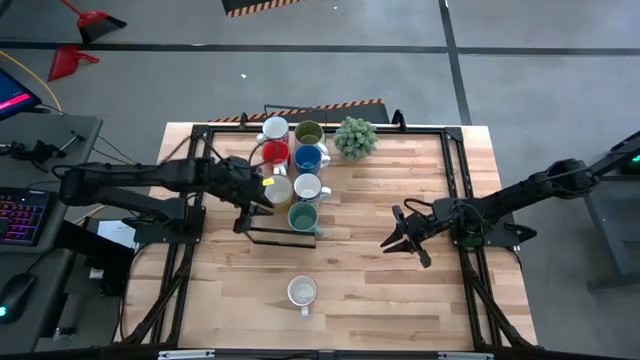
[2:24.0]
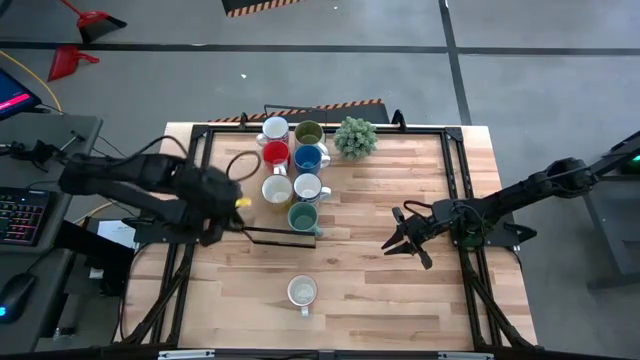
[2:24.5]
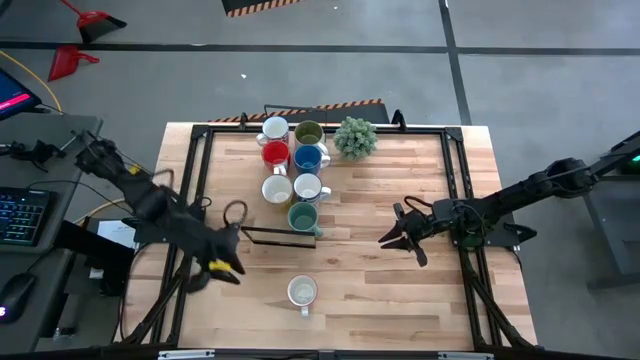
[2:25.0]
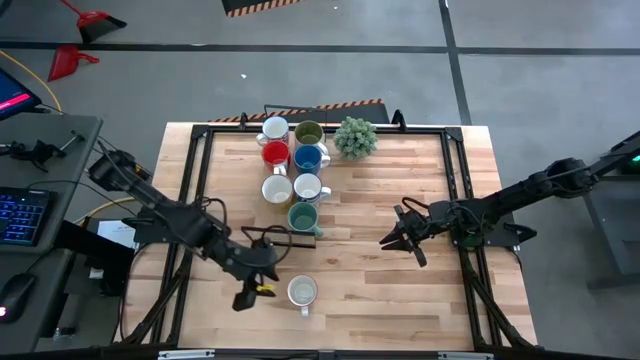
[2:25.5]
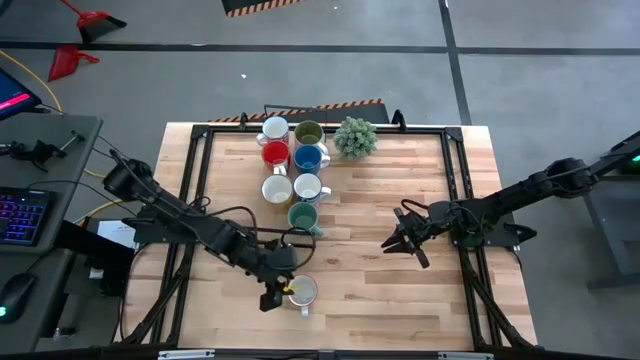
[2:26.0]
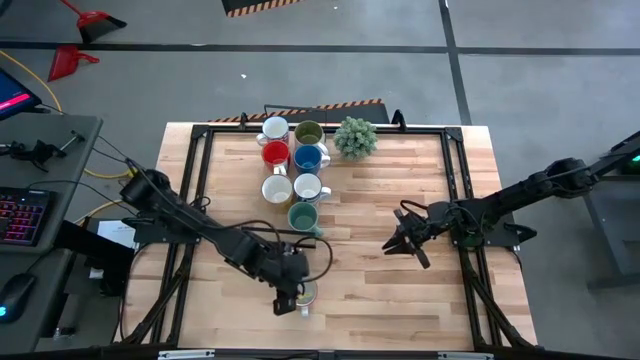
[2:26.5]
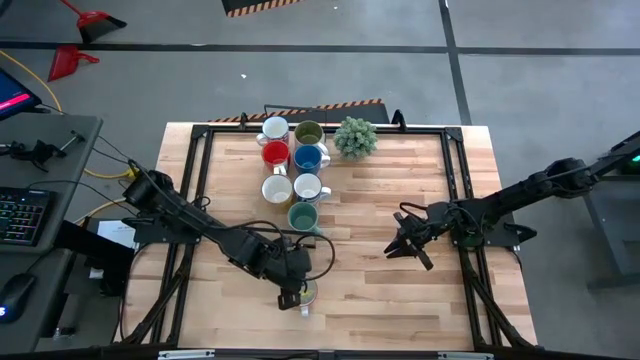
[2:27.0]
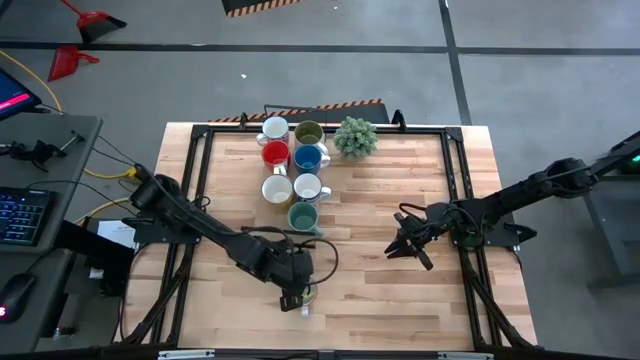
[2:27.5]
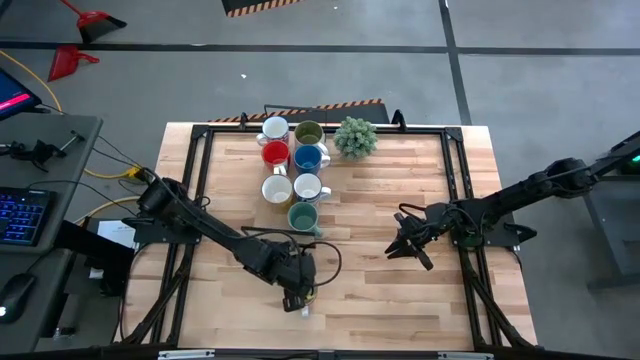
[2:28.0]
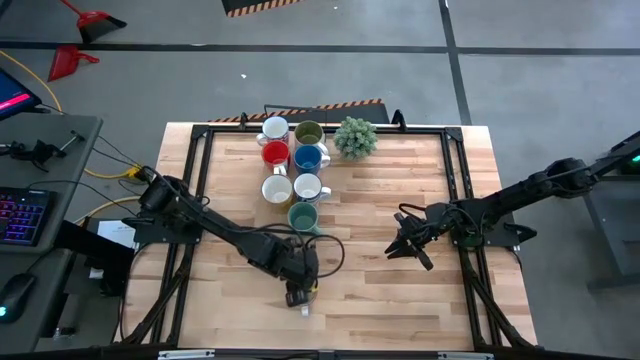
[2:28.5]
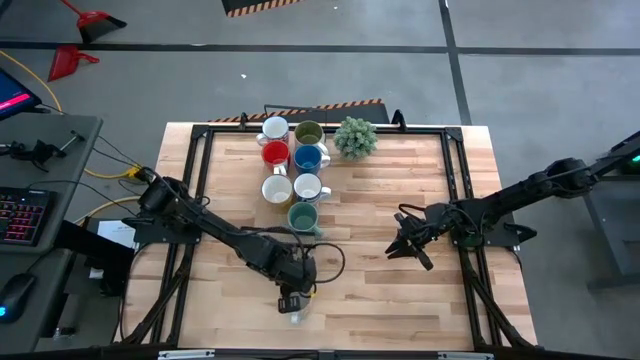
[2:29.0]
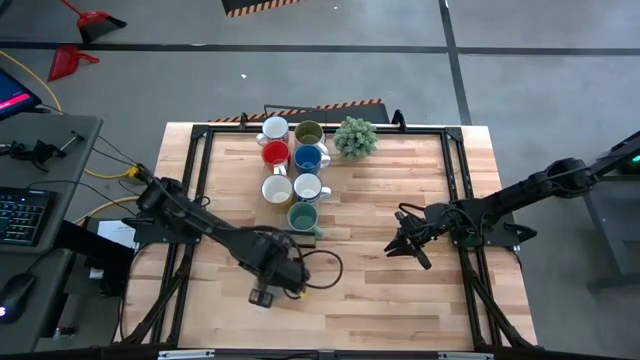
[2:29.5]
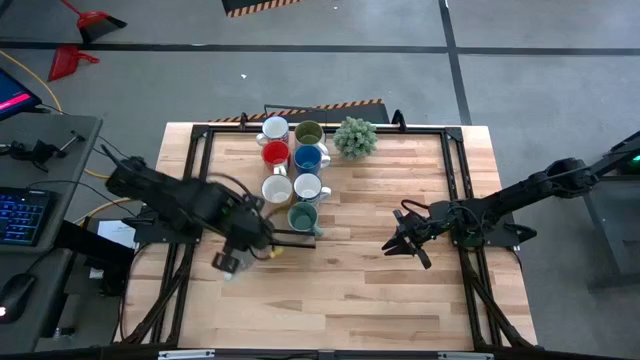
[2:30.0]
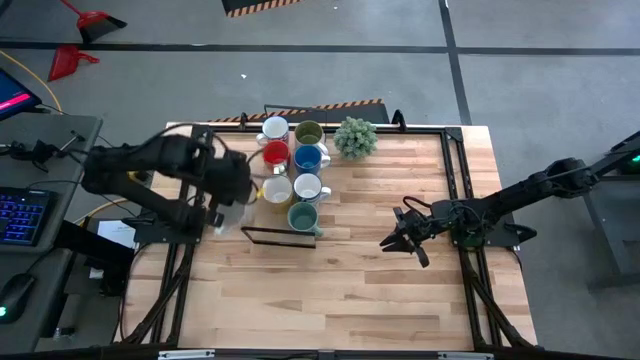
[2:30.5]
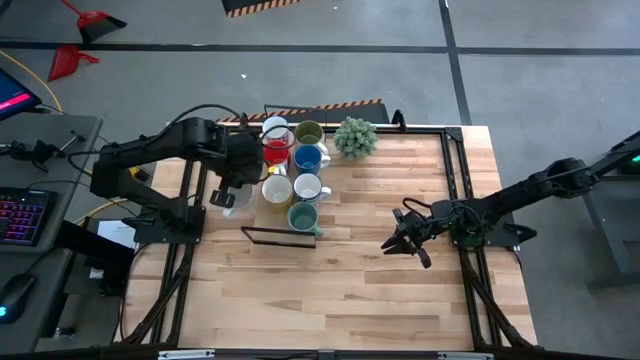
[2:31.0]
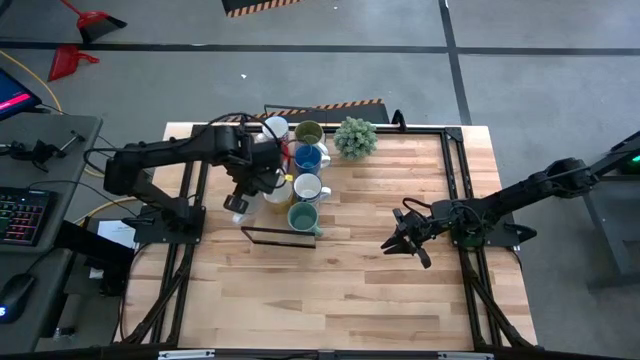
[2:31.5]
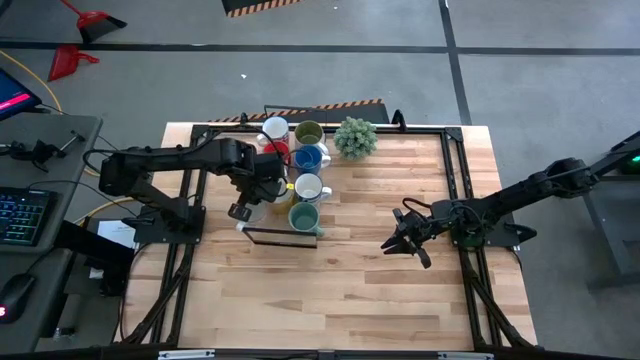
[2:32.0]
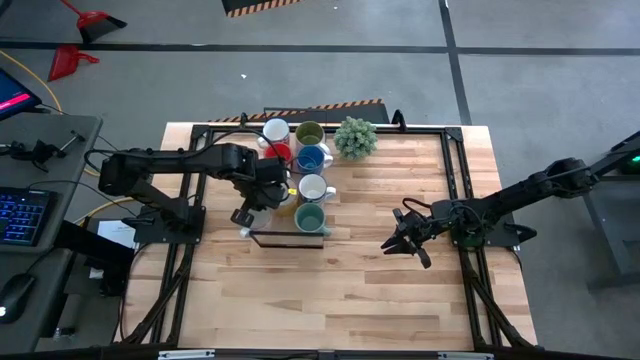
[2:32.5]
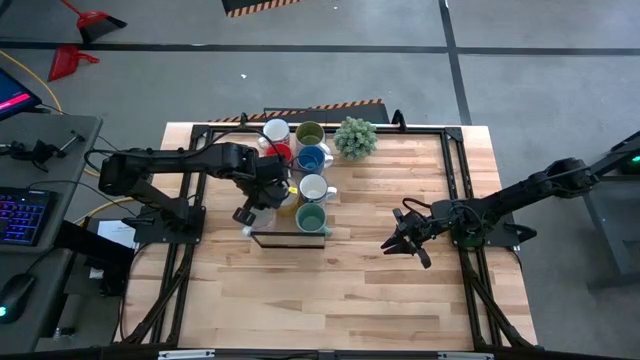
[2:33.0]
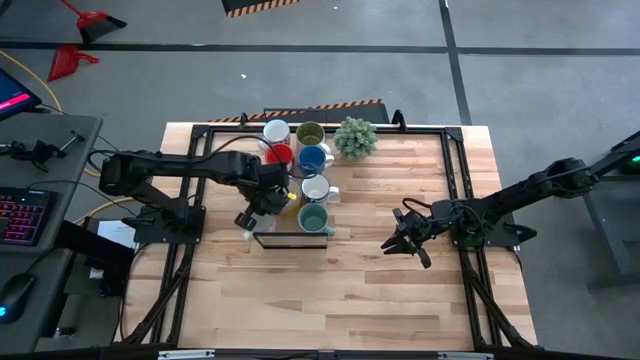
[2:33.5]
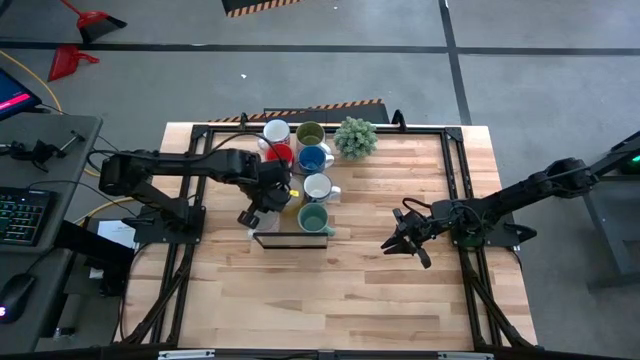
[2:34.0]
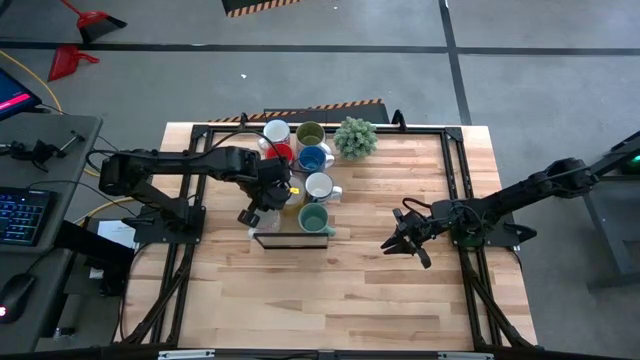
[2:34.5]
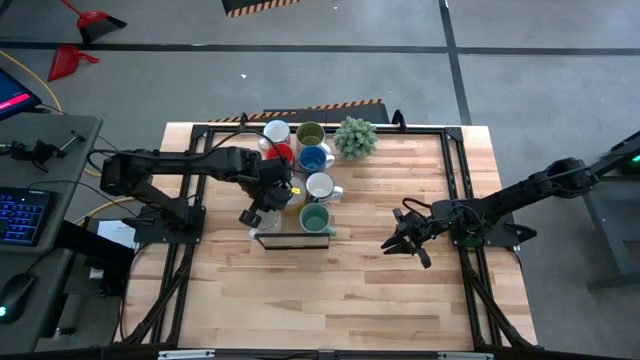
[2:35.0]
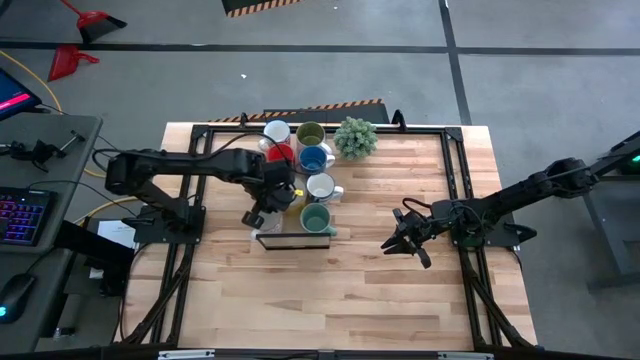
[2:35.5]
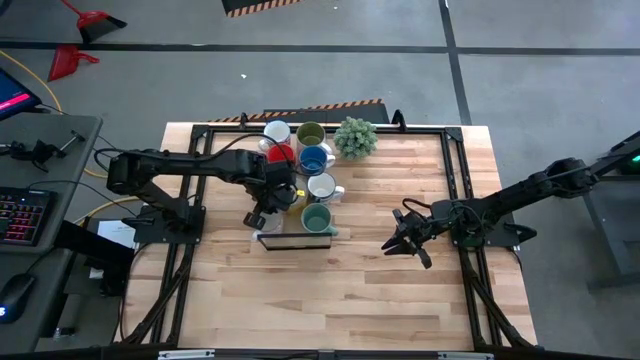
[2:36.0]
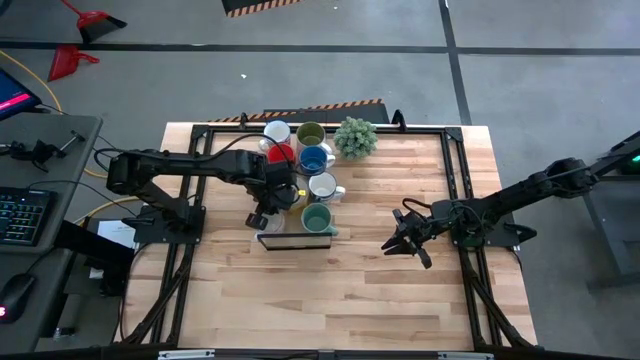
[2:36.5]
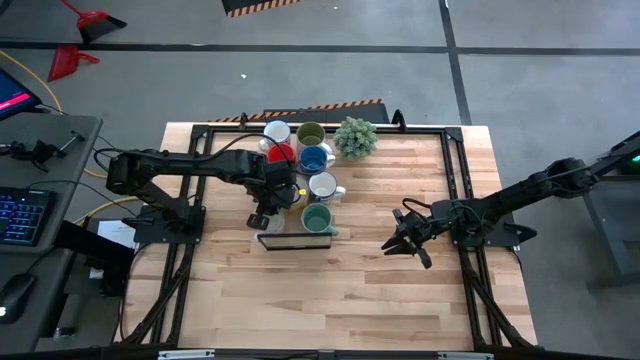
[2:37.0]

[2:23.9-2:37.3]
Task: Place coffee mugs
Put the gray patterned mug on the shelf

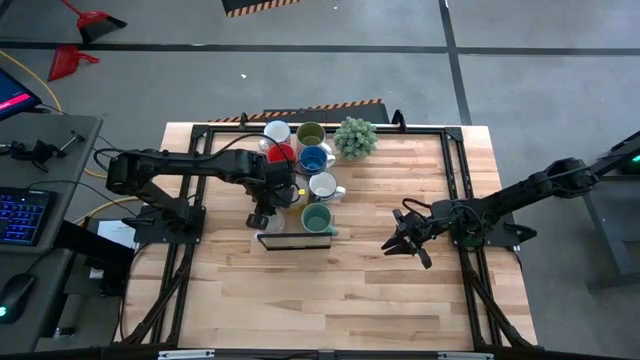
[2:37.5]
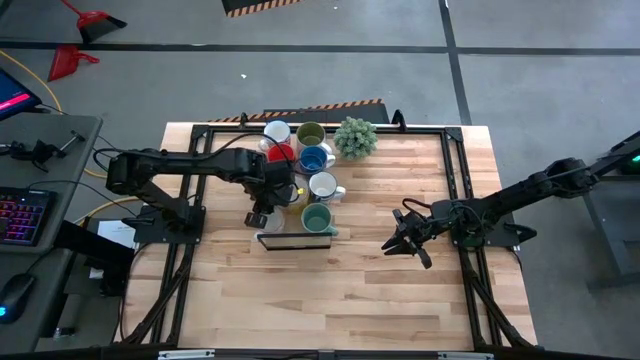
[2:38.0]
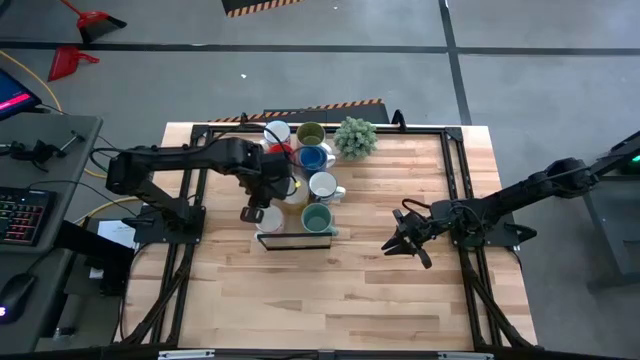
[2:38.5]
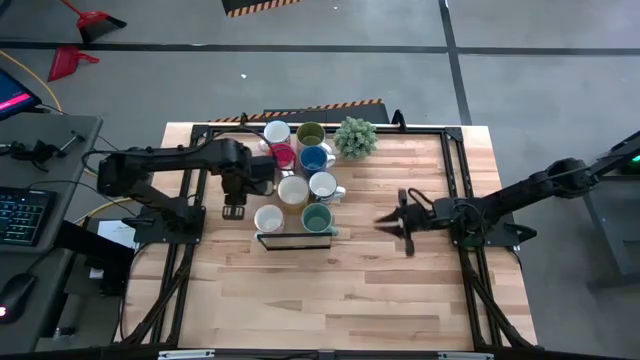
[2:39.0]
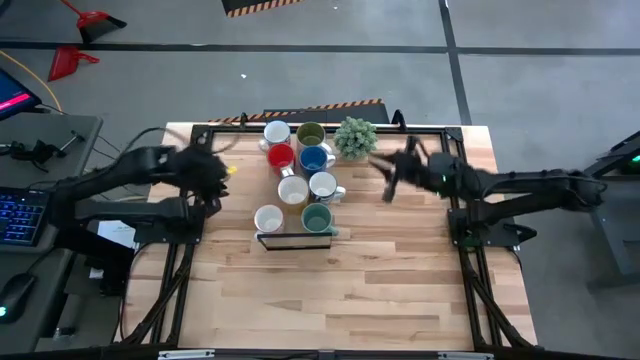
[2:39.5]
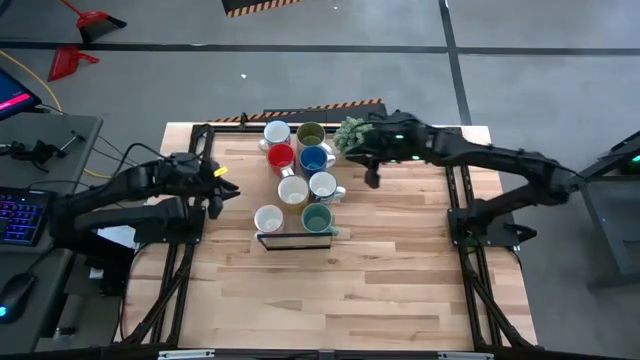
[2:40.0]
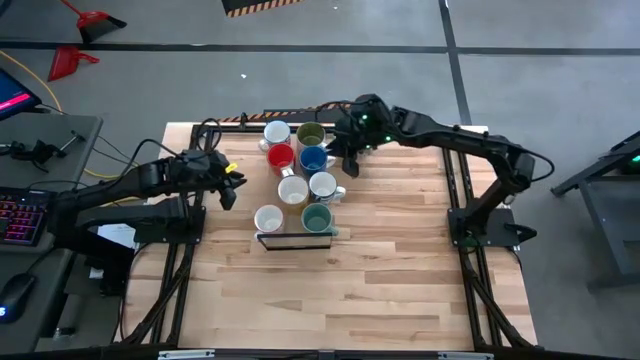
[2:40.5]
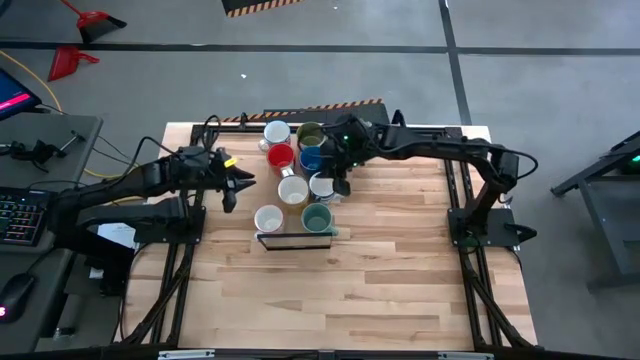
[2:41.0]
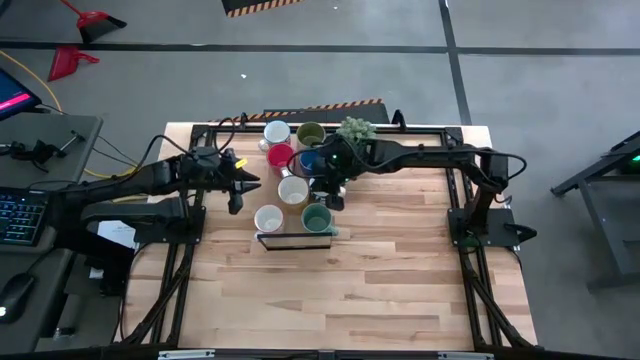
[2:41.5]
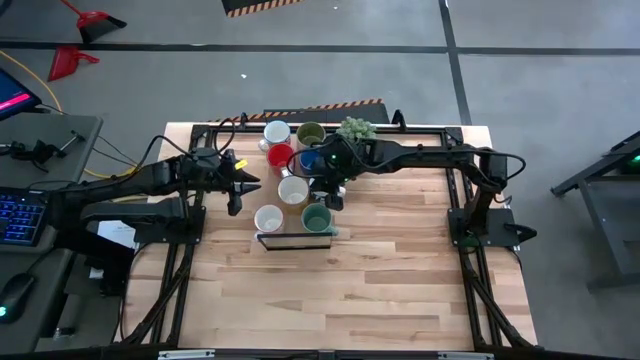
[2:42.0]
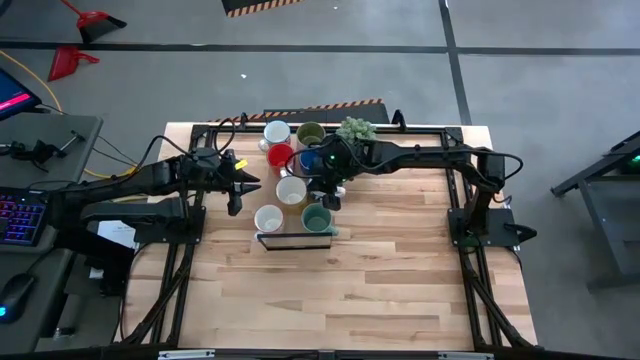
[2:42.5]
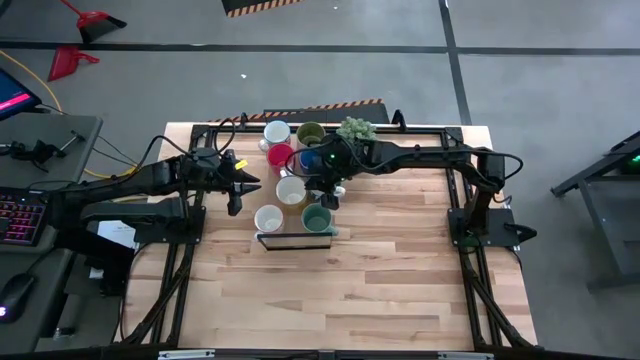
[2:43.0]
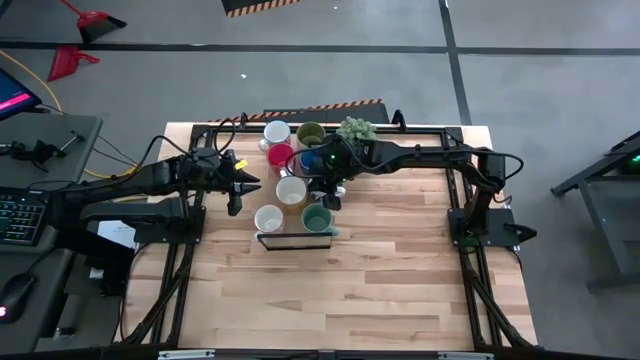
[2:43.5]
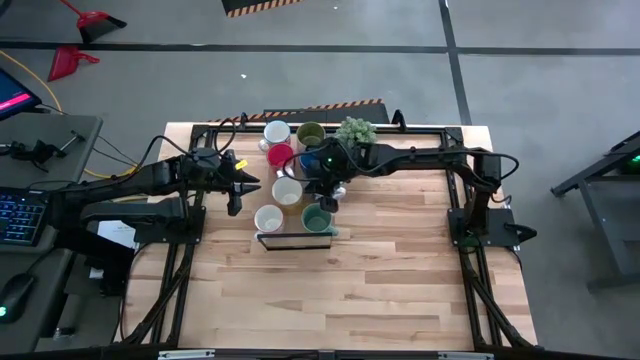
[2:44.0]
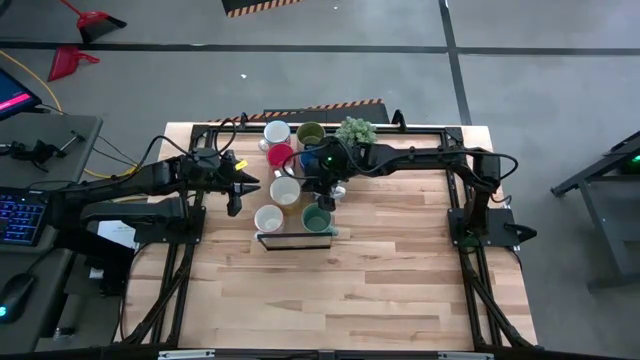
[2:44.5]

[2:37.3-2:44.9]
Adjust the yellow mug on the shelf
